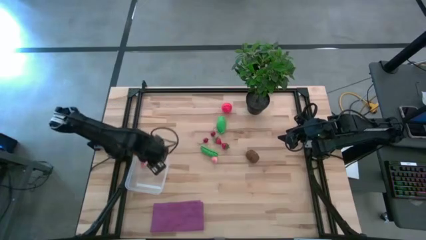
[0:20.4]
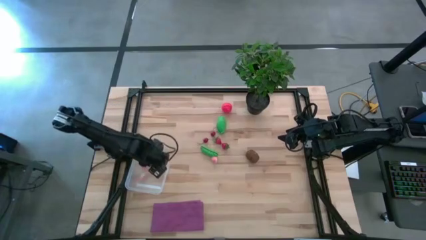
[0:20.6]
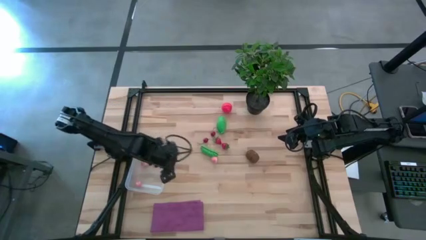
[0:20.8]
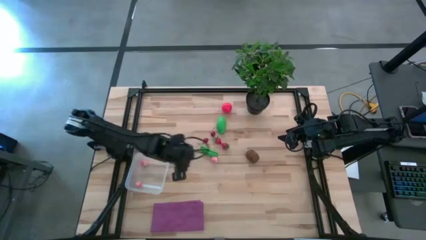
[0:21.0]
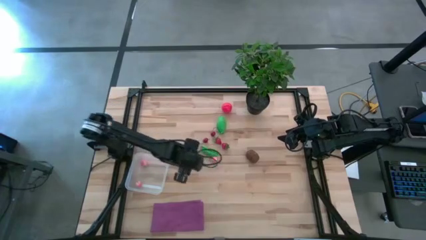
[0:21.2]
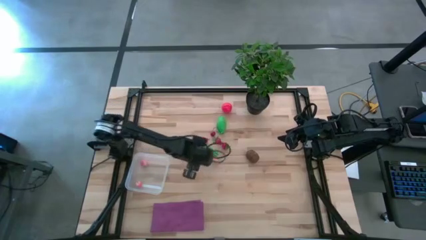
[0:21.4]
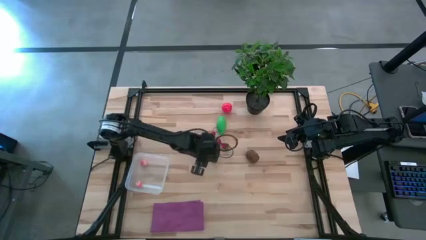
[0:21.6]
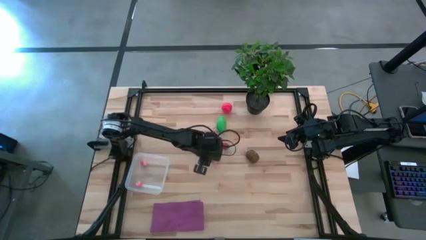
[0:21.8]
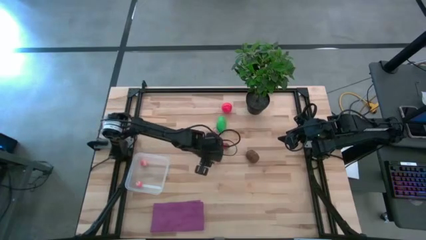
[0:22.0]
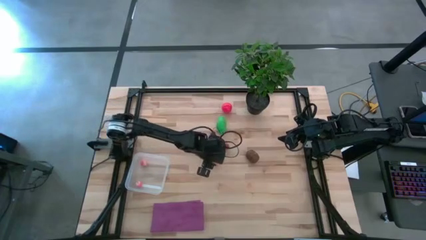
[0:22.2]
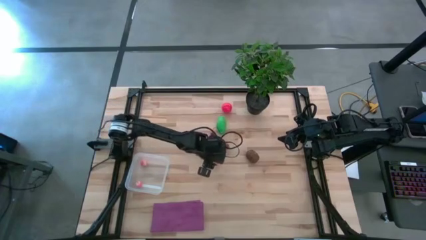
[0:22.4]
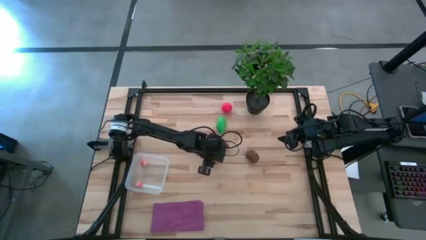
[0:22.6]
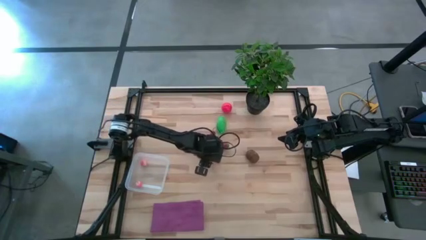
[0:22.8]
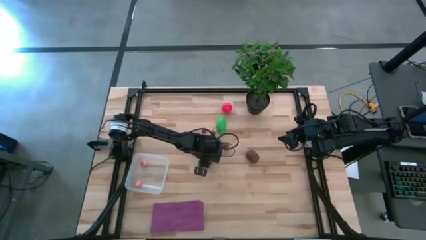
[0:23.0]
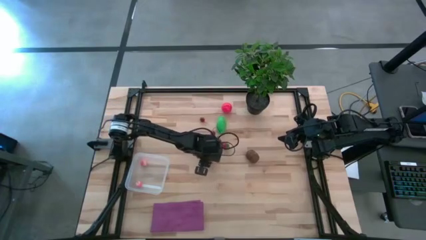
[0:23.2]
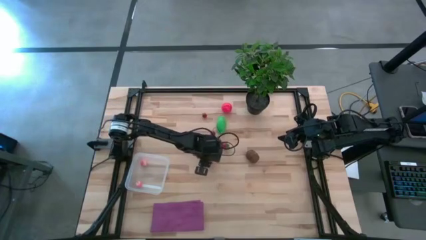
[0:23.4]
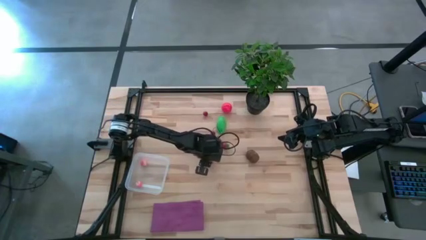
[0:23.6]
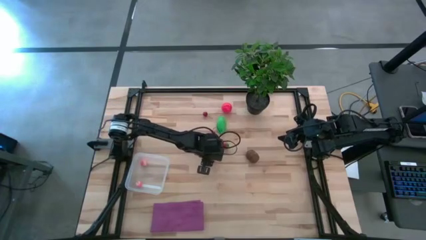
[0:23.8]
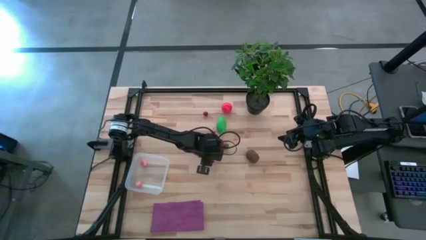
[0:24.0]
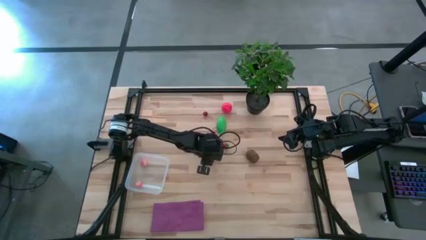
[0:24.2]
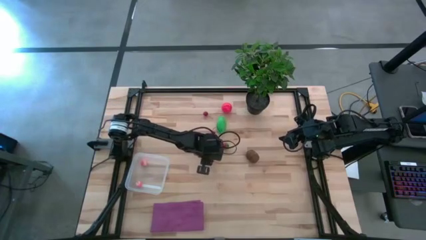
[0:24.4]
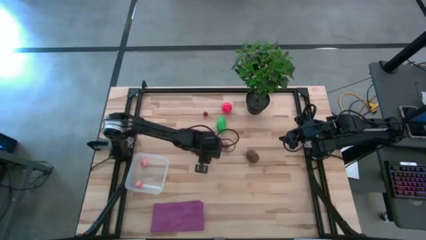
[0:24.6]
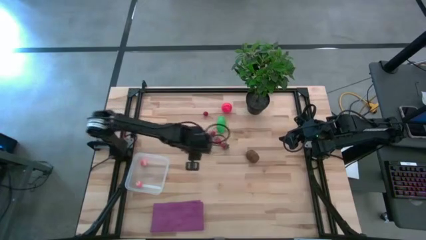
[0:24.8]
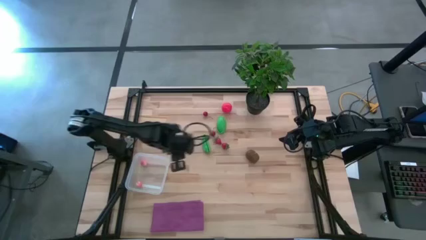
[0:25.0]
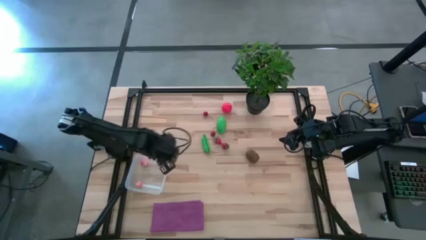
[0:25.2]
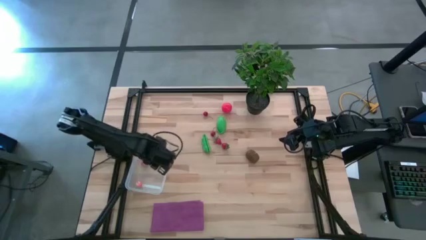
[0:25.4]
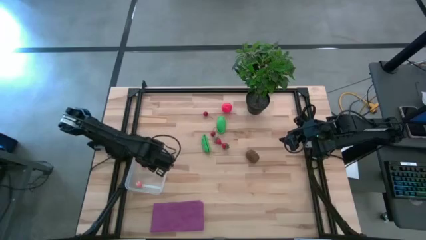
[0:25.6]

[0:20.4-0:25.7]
Task: Pick and placing Produce into tupperware
Put the pink peach into the transparent container

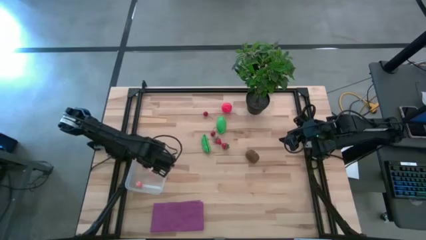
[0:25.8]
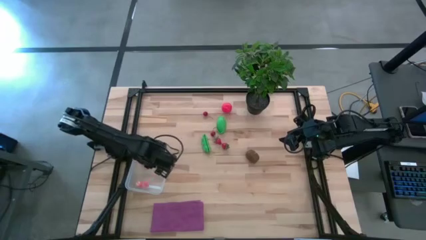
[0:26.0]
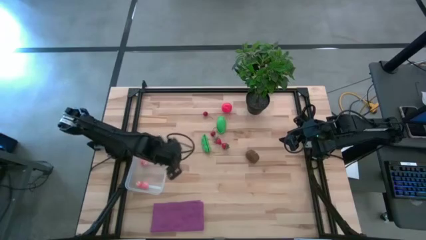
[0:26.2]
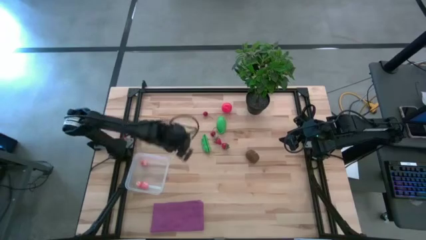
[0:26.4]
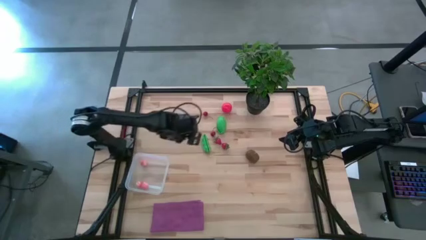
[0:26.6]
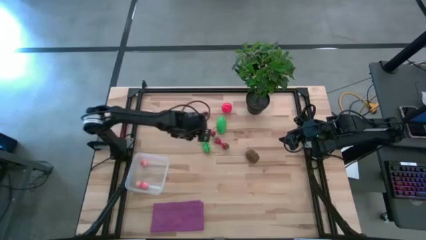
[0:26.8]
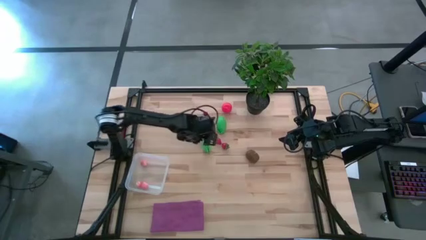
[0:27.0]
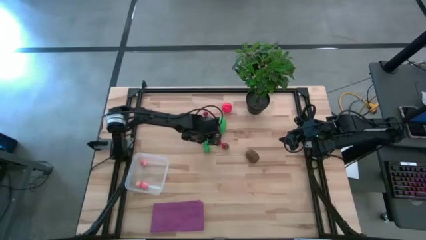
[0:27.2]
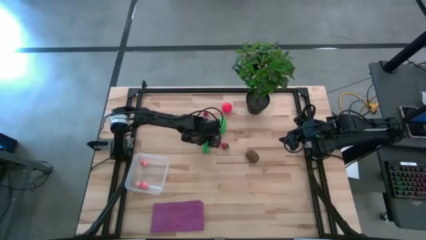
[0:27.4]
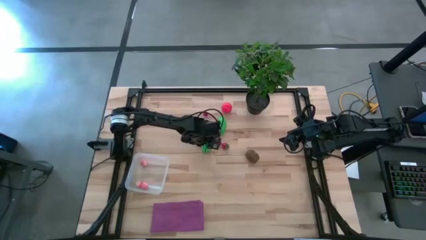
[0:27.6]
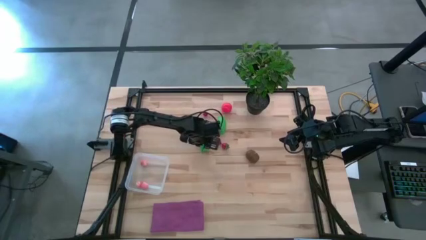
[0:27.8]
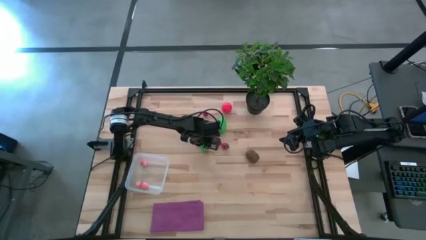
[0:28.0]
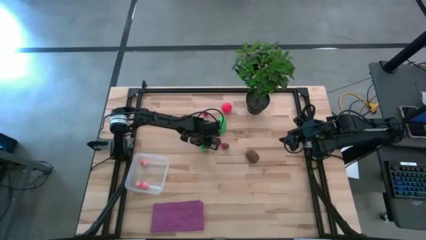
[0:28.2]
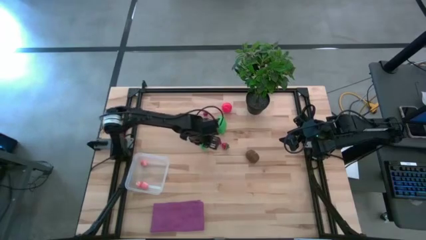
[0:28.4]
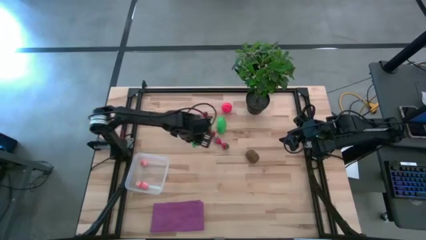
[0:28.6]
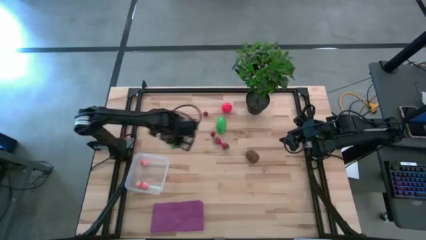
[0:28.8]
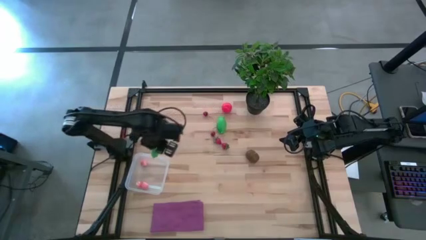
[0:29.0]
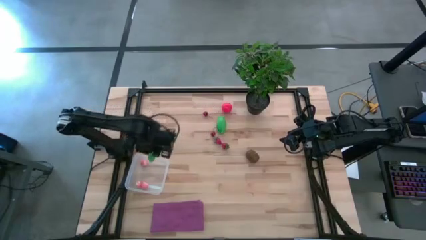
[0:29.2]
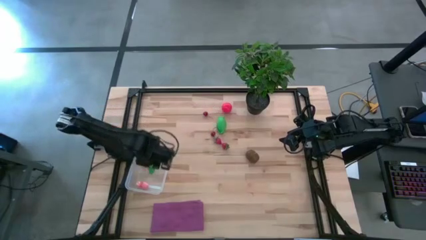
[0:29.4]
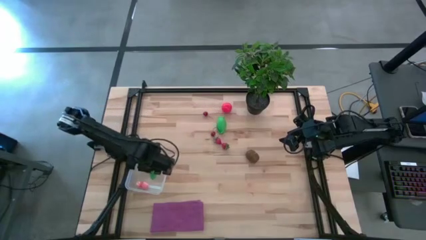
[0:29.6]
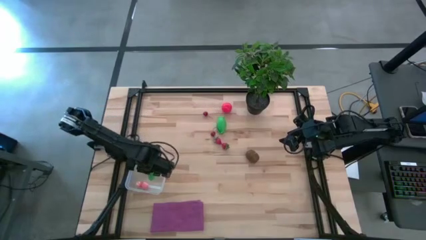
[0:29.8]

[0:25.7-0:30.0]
Put the green bean into the transparent container

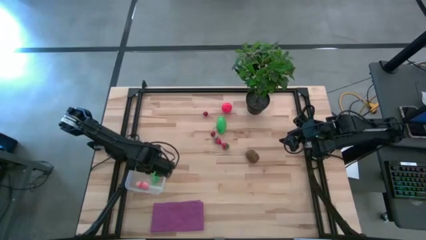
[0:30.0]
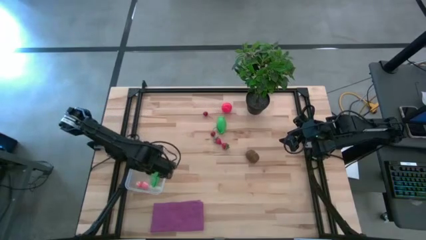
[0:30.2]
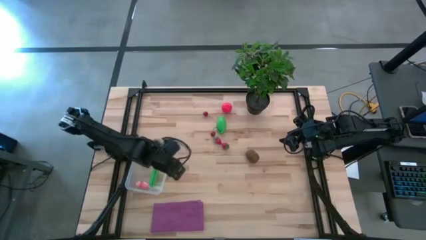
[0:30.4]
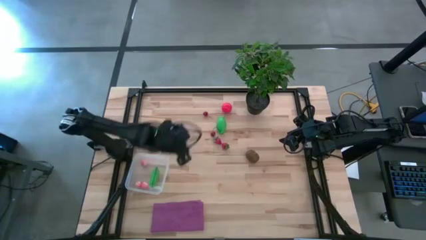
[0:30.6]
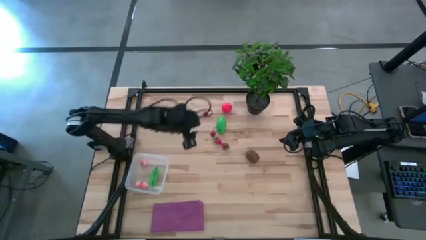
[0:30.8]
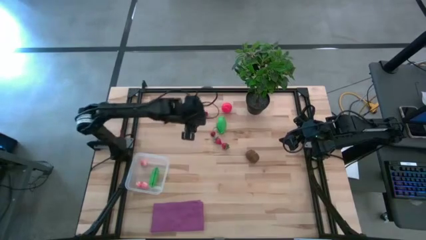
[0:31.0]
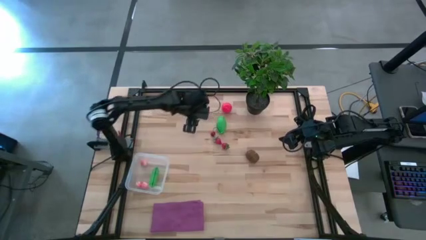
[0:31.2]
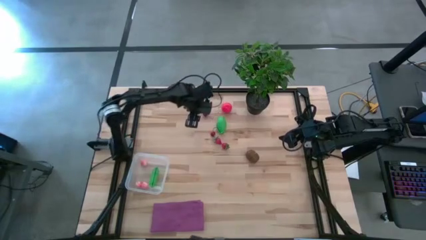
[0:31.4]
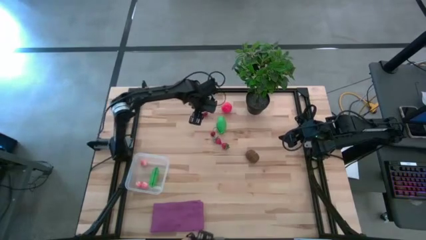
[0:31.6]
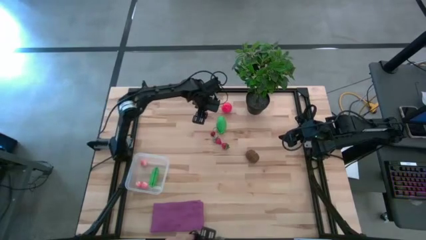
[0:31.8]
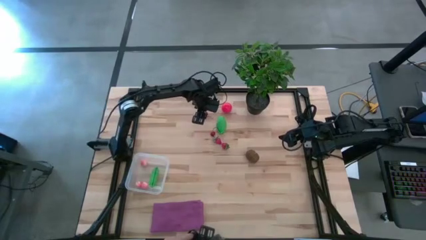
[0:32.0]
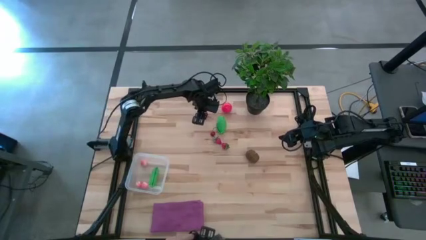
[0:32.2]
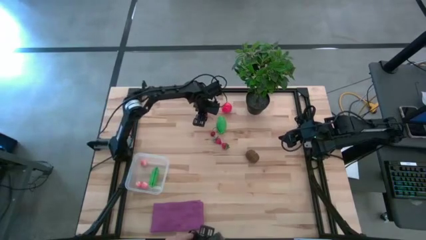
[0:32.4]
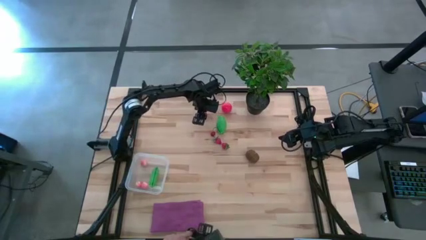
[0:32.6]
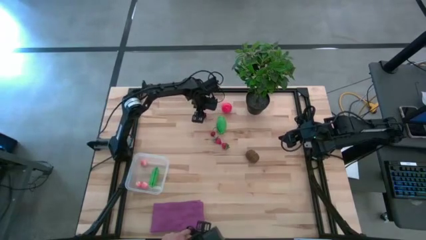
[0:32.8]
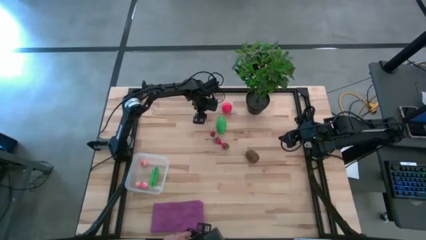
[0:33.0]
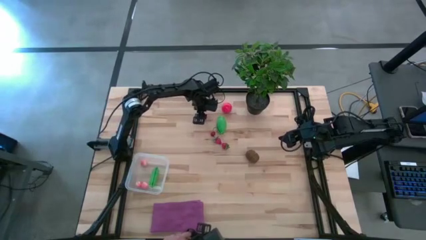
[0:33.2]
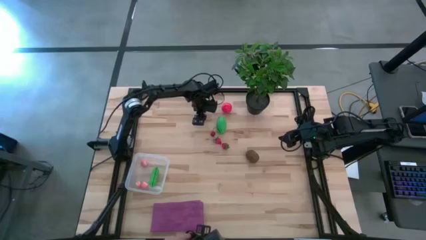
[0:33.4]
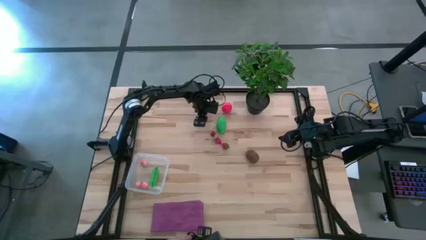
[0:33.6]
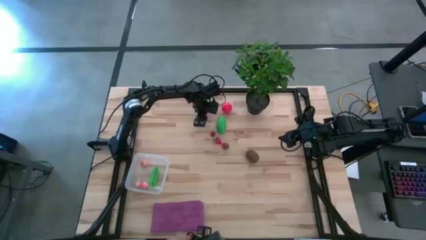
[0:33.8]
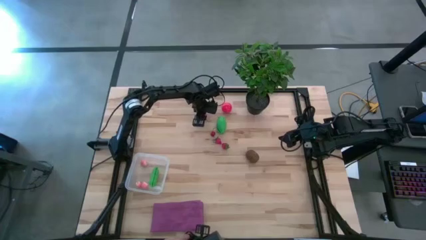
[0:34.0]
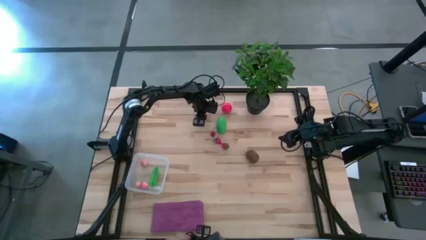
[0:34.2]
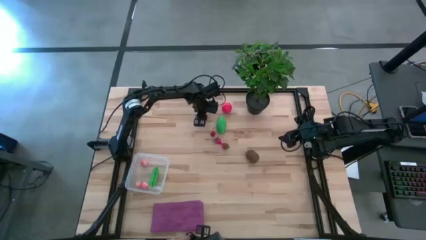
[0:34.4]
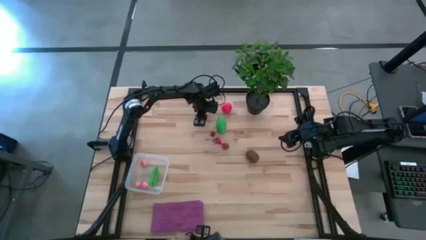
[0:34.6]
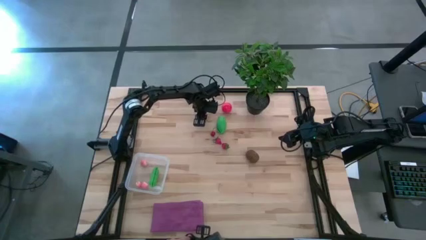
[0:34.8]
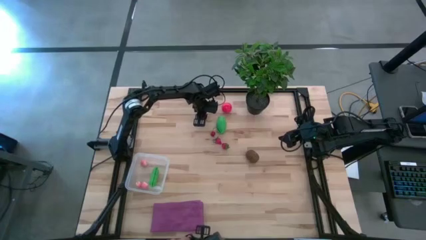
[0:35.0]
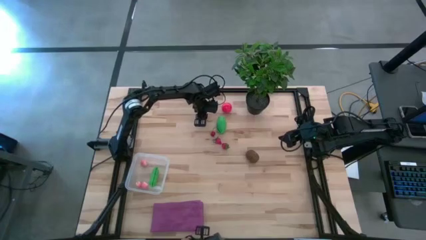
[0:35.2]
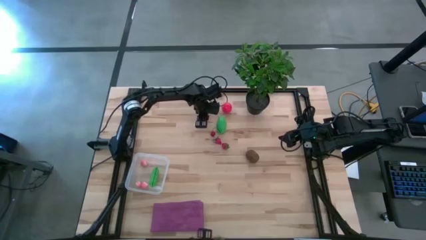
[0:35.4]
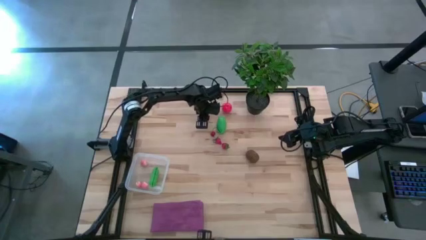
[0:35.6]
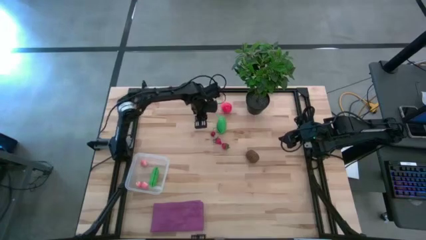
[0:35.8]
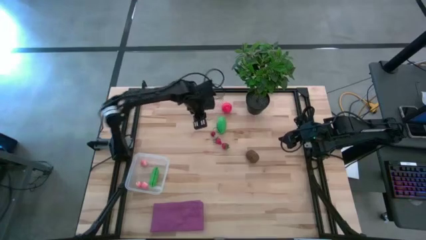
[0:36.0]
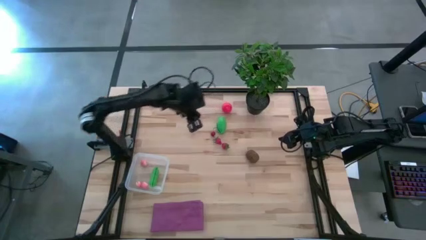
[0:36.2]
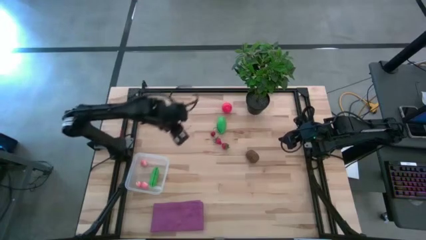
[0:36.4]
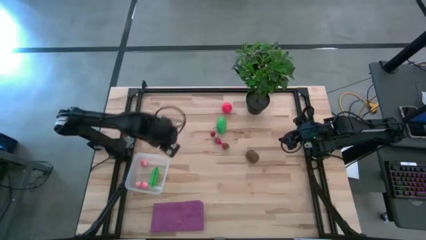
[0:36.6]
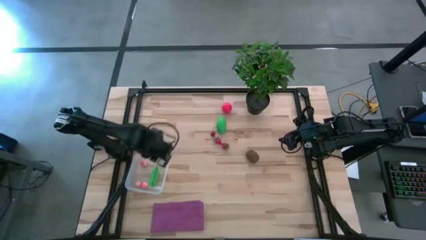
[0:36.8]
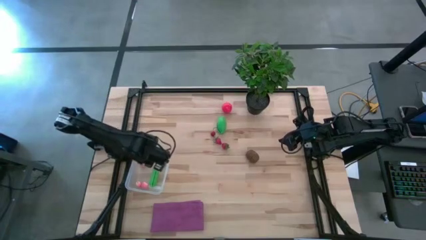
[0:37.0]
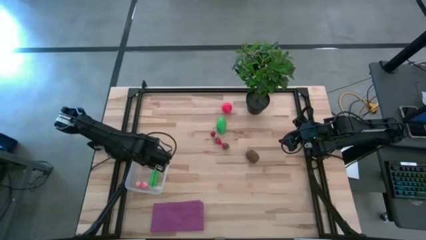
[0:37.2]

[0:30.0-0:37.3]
Put the top red cherry into the transparent container
